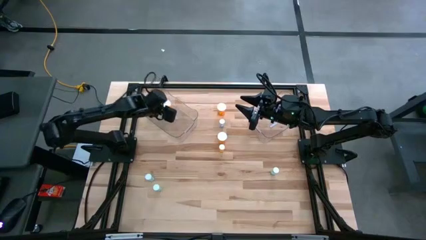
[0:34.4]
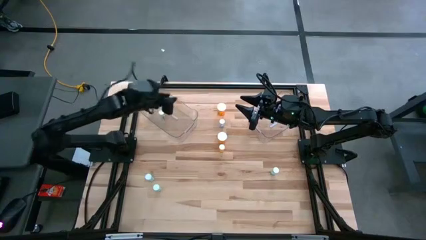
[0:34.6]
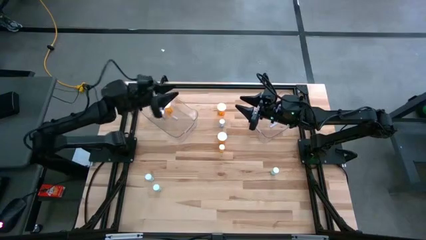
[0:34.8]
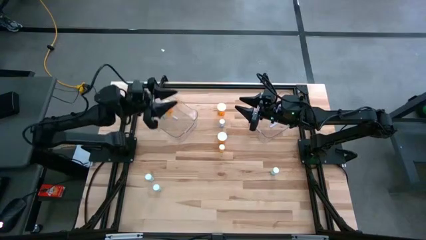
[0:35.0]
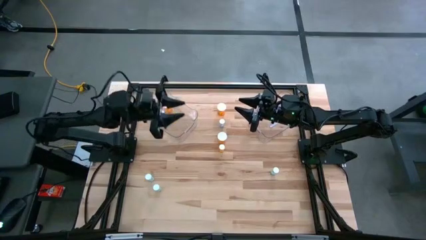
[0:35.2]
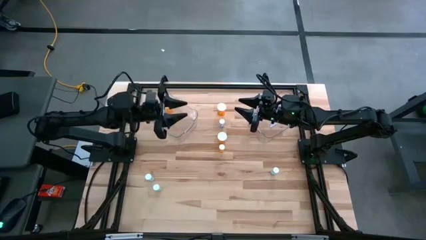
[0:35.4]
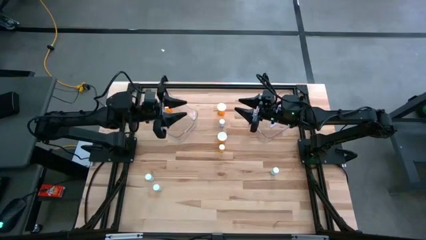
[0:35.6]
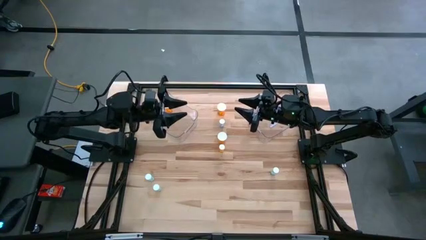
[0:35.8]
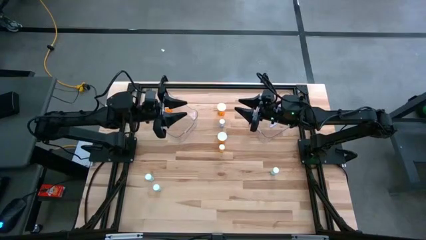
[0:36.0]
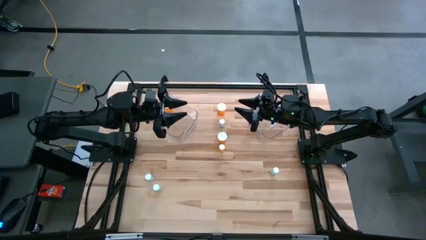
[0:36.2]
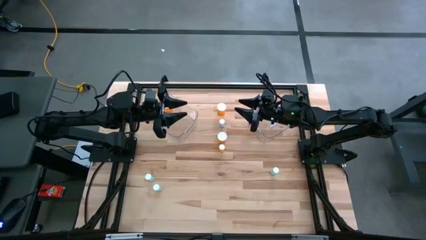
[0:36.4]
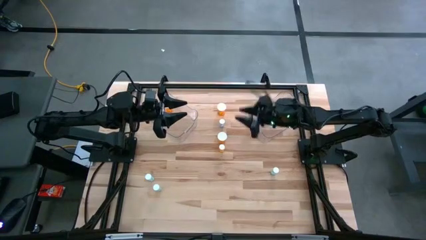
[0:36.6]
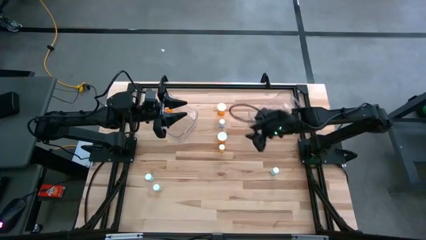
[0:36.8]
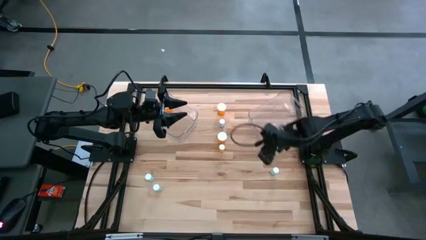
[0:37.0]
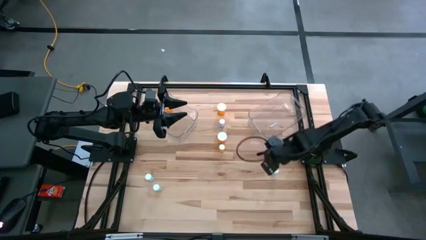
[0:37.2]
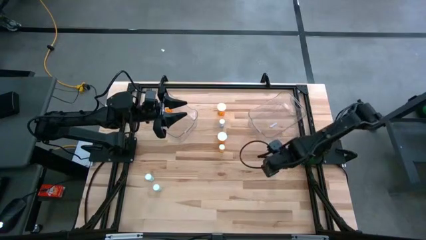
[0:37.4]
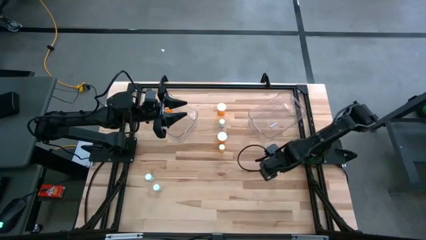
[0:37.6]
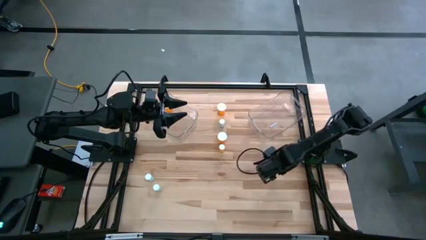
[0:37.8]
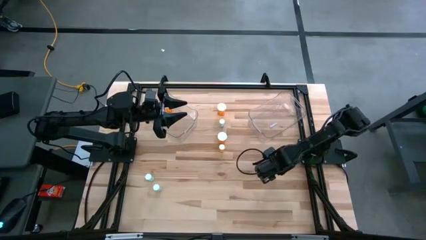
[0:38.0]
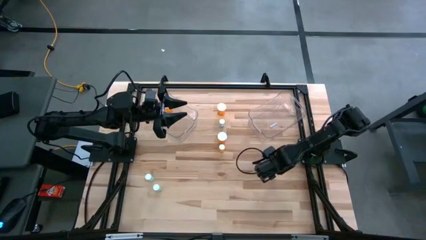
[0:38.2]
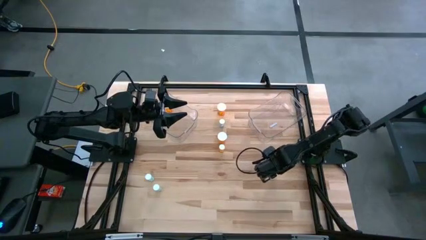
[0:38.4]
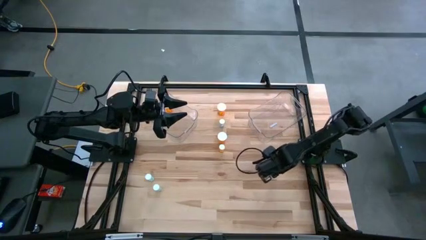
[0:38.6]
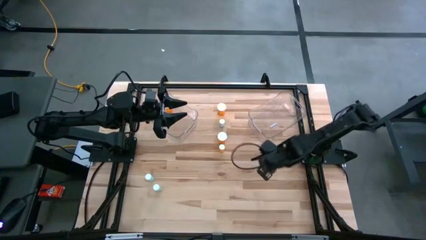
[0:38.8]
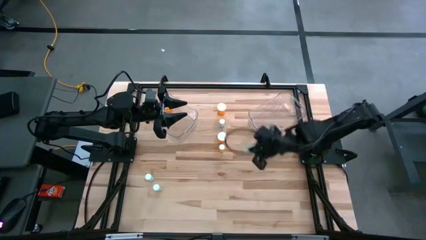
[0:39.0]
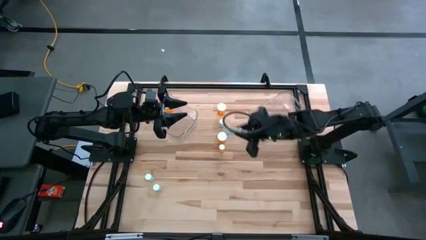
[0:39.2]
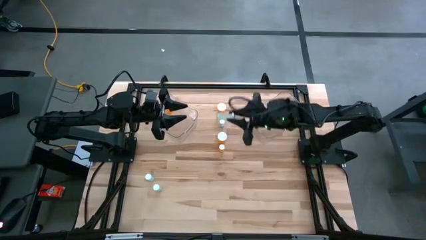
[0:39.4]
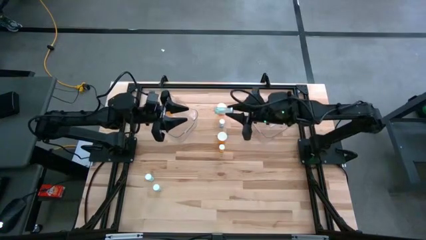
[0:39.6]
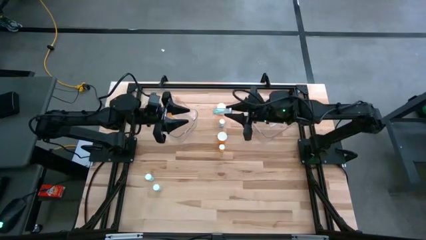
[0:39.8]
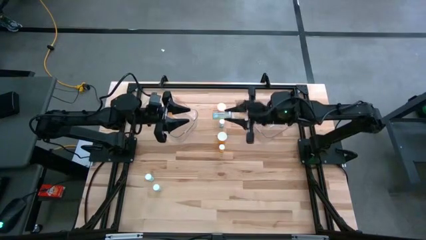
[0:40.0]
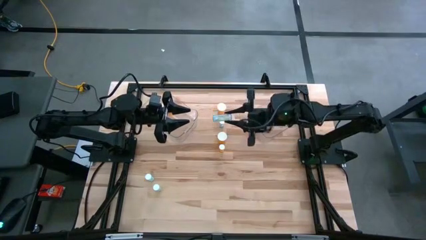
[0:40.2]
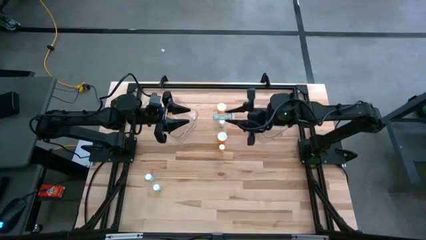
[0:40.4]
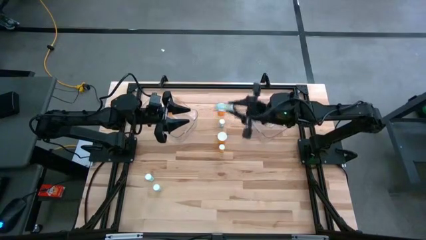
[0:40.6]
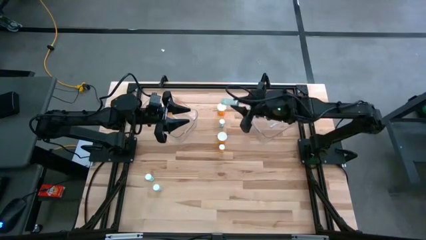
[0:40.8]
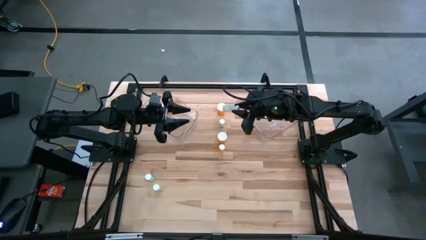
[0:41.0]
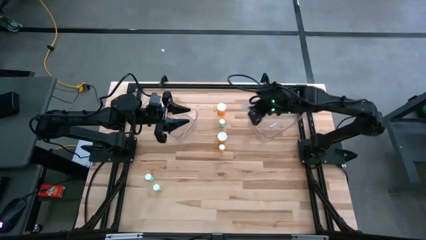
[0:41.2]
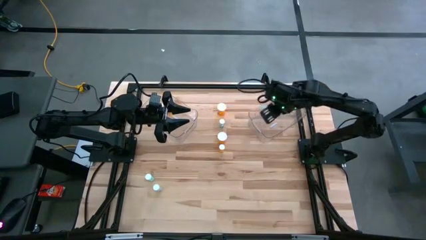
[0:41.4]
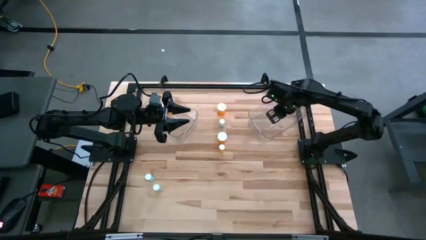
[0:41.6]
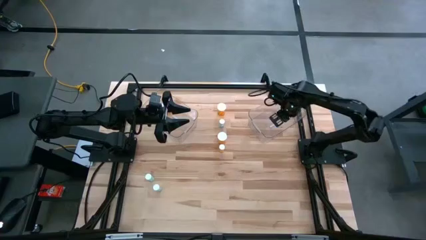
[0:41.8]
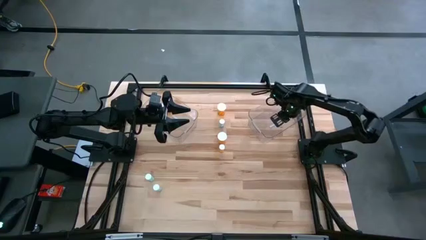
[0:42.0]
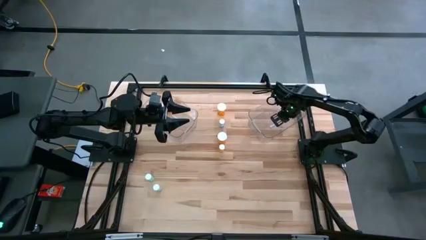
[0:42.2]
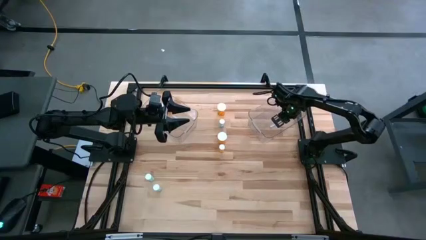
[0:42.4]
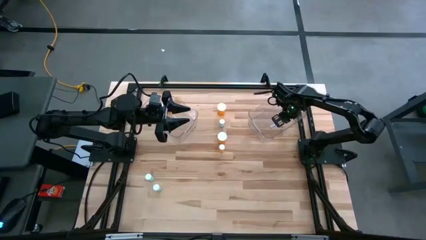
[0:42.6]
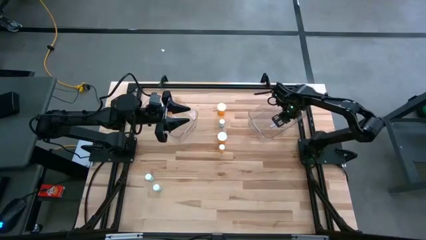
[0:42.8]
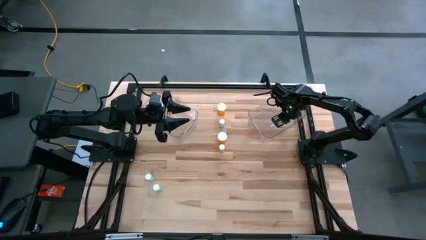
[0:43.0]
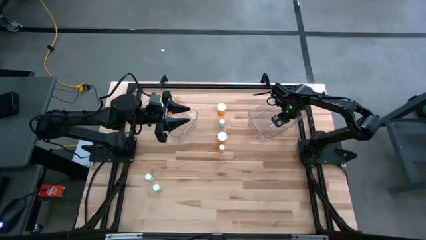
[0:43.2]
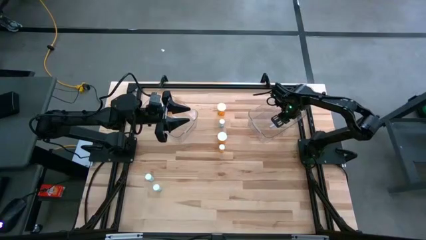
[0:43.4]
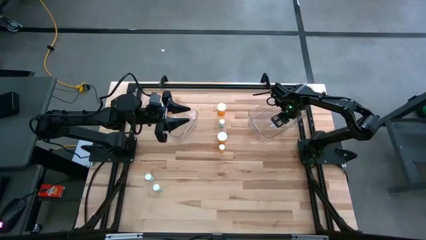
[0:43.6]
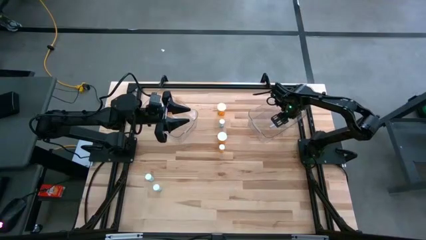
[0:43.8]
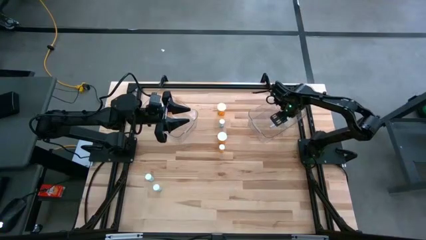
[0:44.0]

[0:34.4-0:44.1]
Task: Pick and place medicine bottles into bin by pill shape (circle, oval)
Put the top right green tablet bottle into the right transparent bin

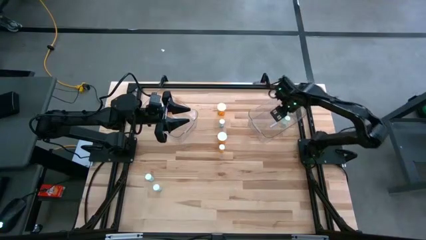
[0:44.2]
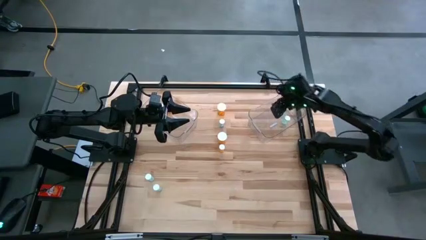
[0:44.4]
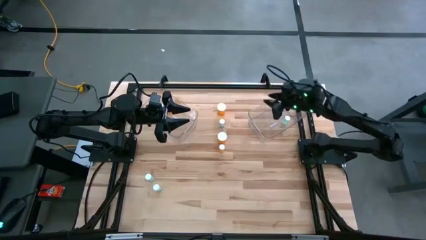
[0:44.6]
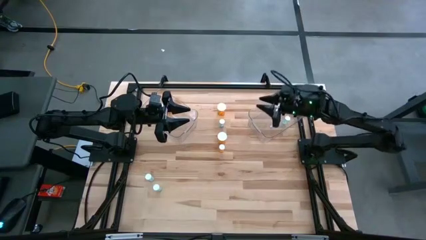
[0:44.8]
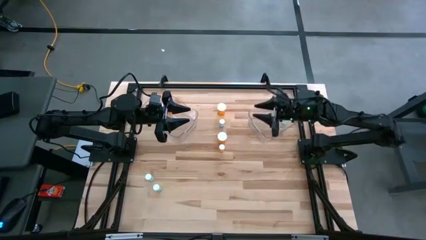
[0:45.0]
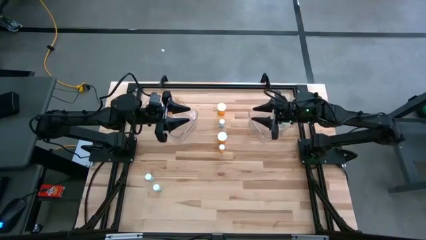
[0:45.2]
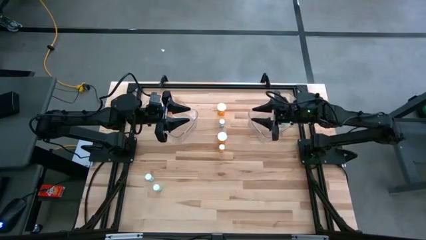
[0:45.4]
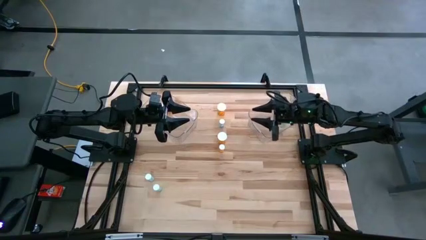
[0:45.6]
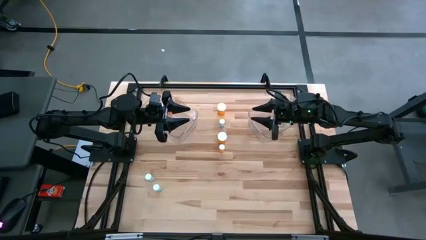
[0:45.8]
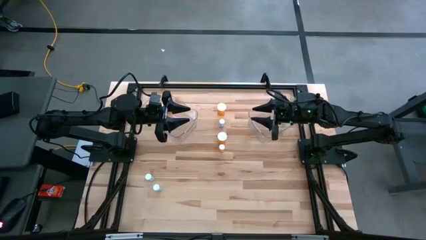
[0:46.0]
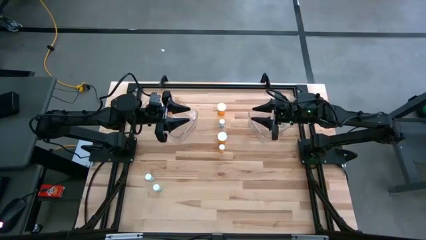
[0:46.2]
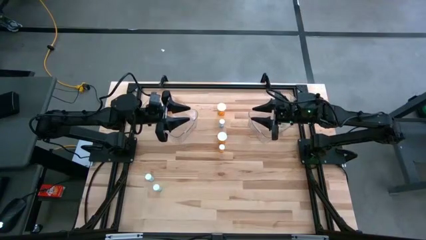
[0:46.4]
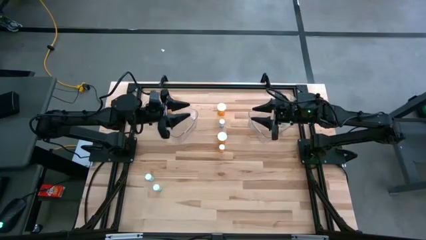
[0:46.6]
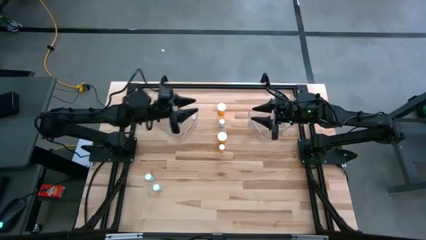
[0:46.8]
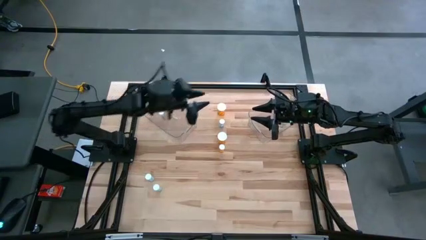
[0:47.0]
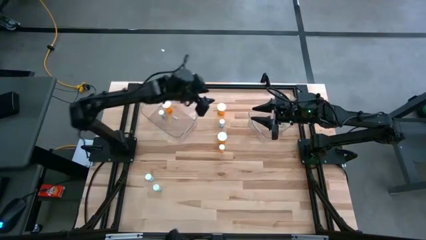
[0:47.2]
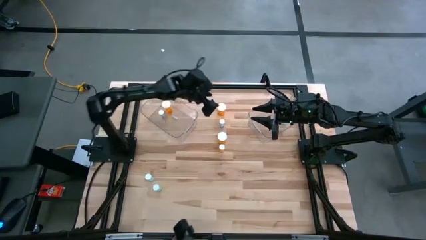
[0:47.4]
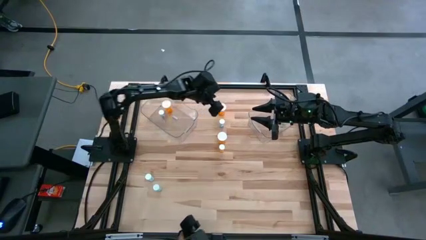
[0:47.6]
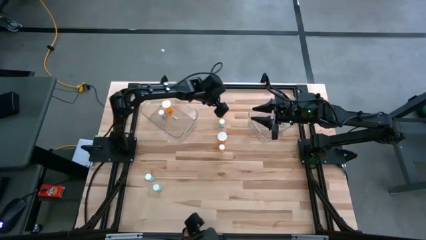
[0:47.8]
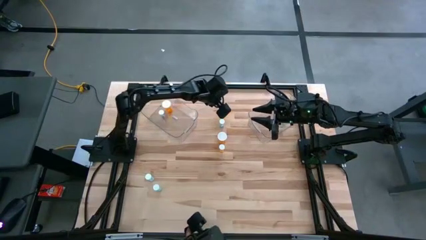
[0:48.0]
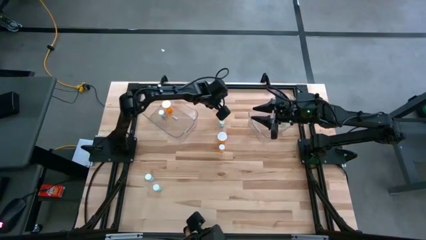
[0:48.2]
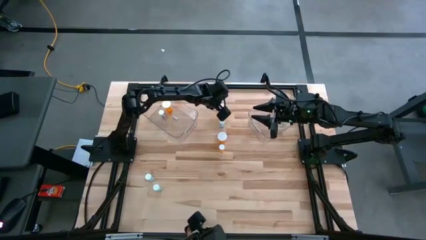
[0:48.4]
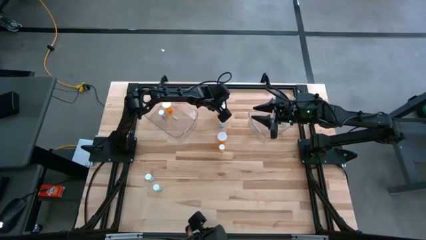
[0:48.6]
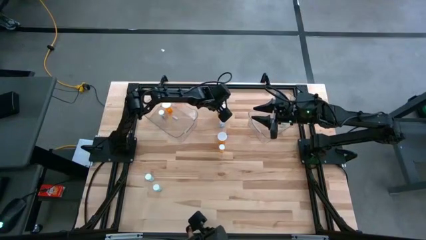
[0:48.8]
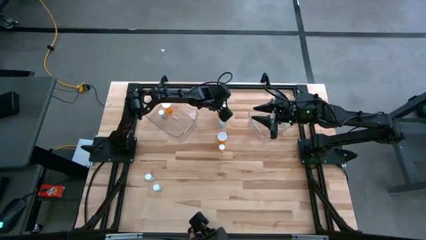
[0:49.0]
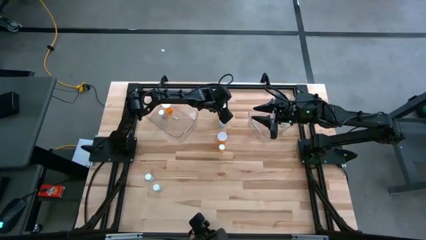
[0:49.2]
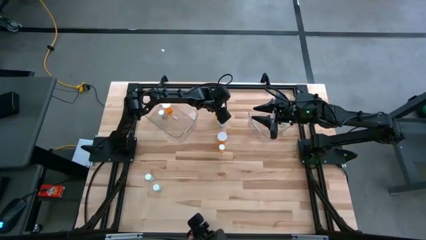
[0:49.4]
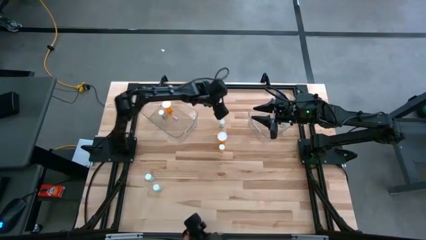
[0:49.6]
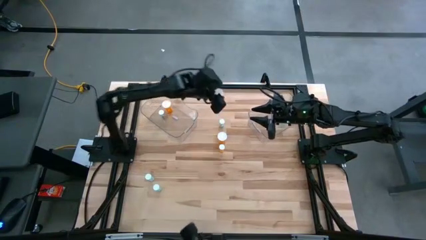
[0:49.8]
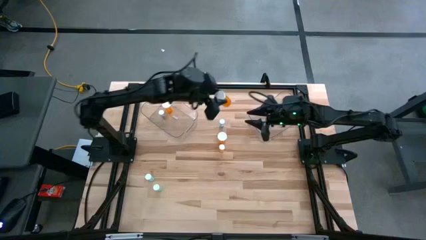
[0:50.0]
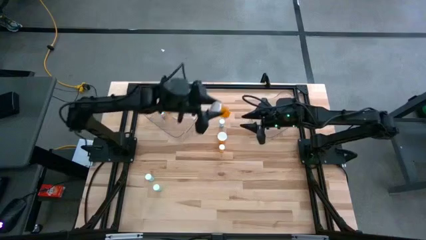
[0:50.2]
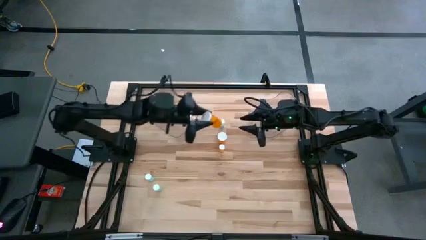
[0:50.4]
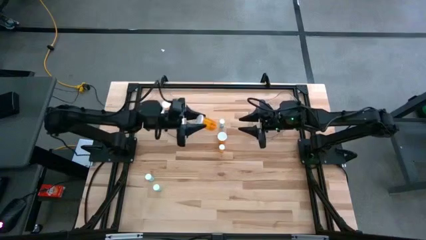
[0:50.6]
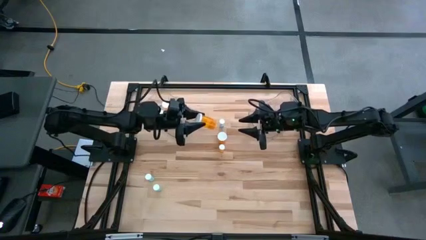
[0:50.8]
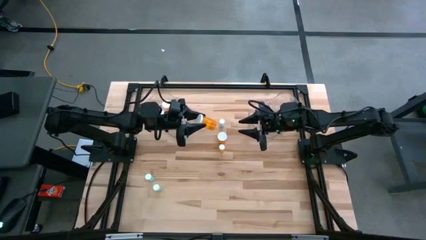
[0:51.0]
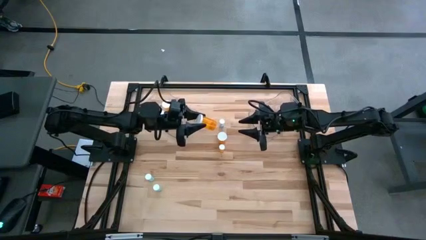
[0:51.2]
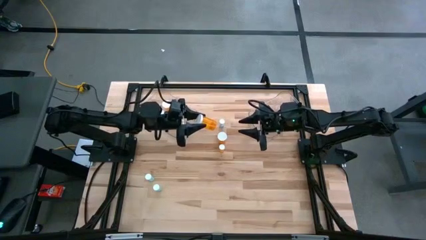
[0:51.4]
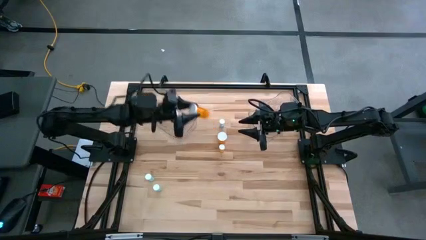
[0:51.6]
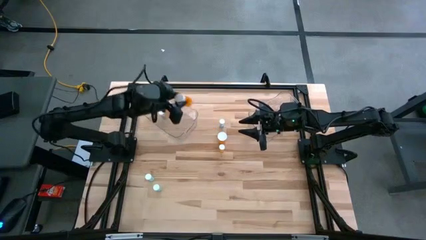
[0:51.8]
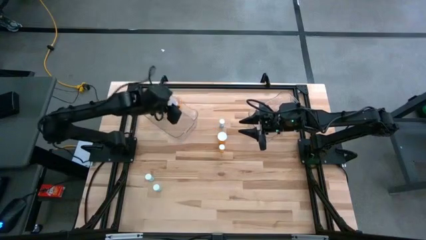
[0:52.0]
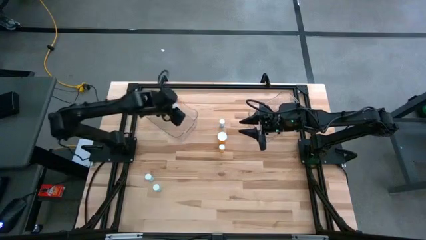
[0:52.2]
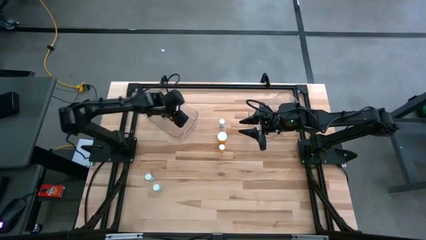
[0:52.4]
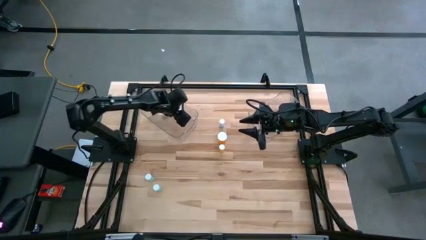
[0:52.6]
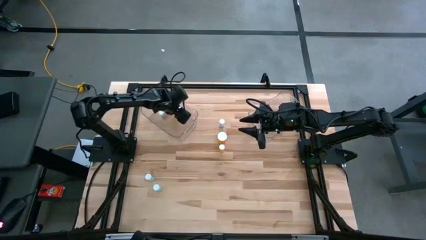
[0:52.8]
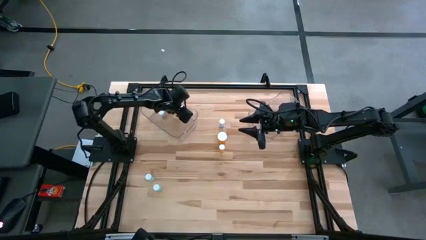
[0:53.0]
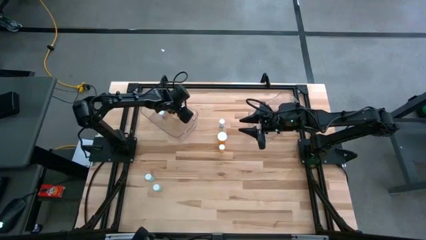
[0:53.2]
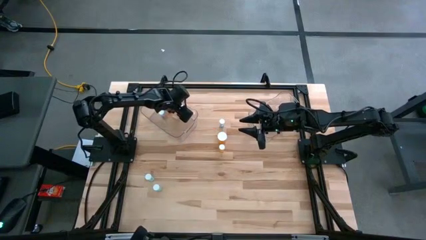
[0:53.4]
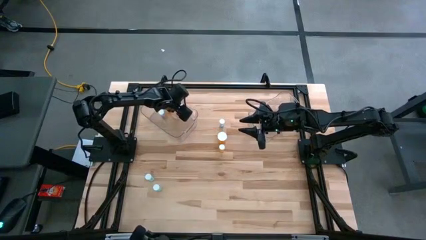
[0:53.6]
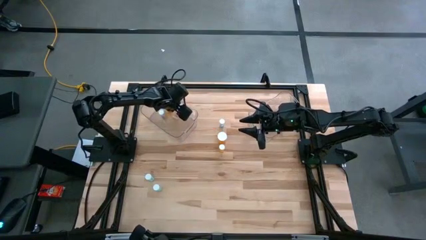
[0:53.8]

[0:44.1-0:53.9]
Put the top orange capsule bottle into the left transparent bin
